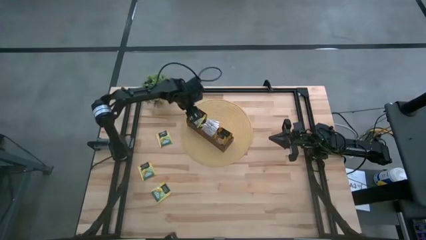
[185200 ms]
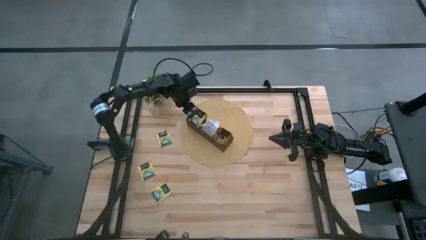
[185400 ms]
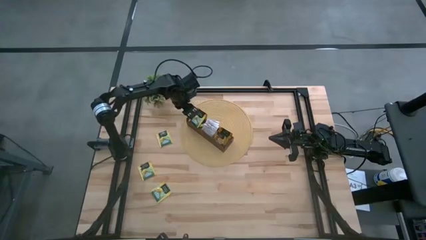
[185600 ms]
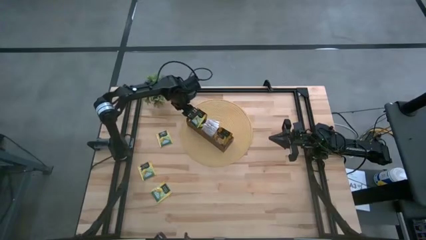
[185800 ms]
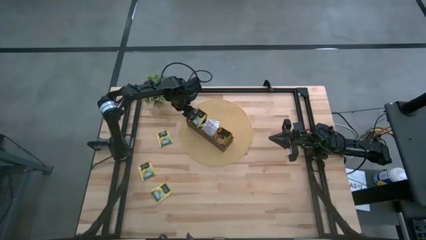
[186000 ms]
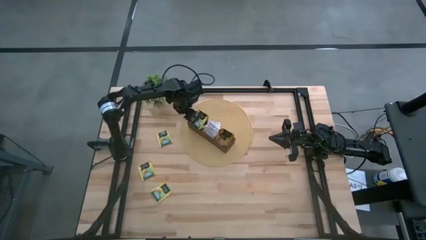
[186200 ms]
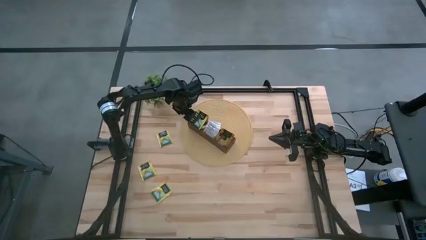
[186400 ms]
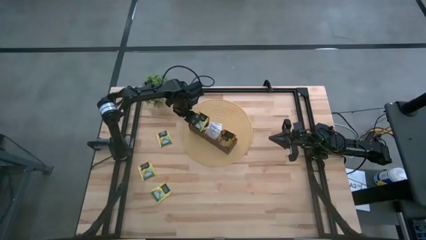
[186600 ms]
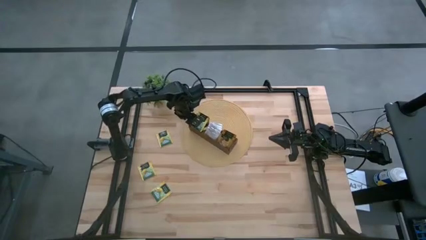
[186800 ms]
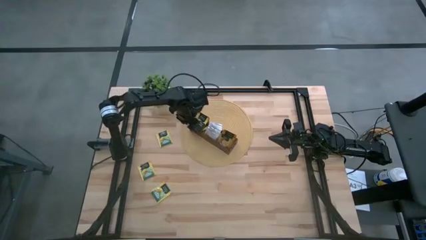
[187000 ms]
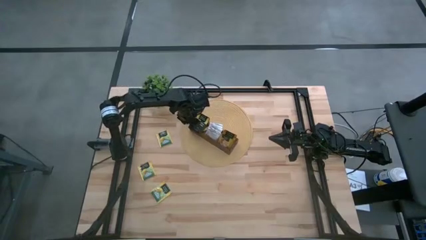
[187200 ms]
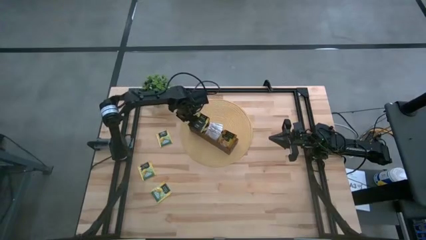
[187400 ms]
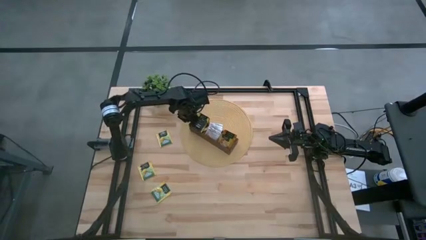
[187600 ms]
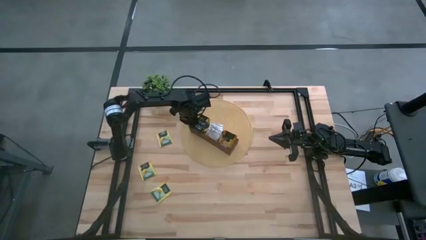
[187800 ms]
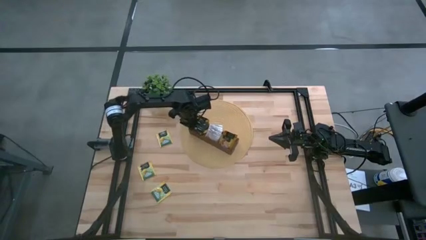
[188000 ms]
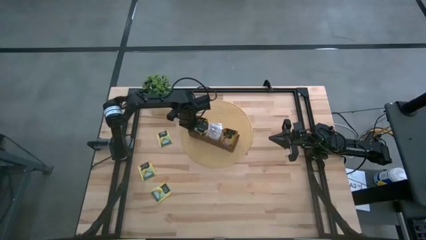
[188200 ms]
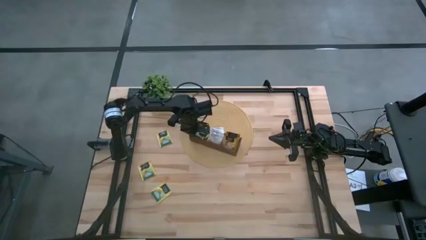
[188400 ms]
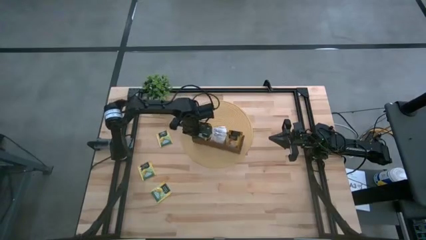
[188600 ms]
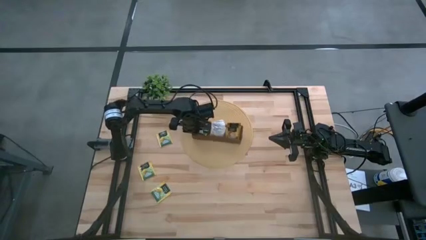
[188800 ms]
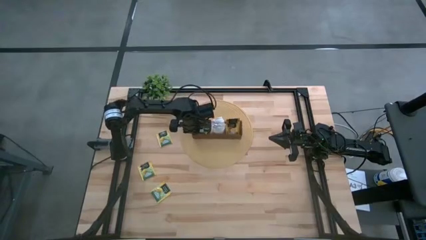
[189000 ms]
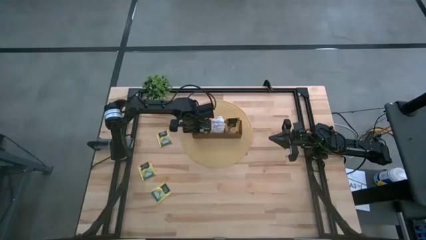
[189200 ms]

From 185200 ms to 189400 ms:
Task: Pick & Place Tea
Adjust the wooden organizer

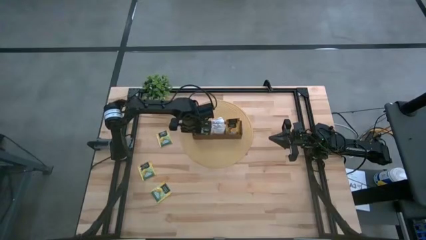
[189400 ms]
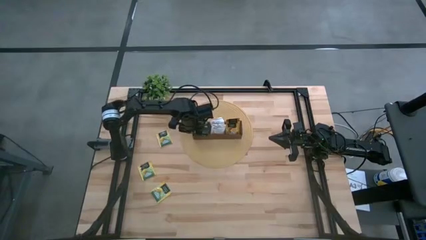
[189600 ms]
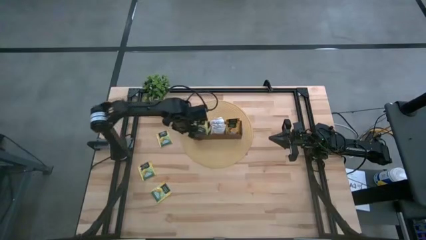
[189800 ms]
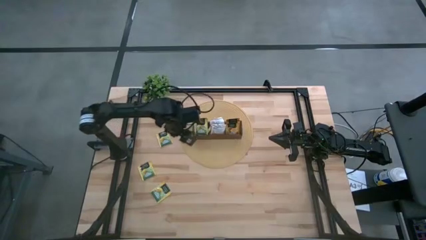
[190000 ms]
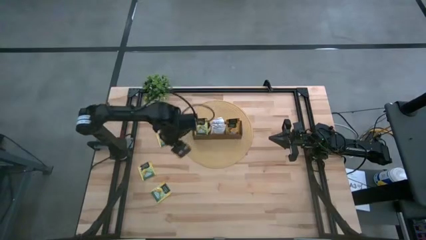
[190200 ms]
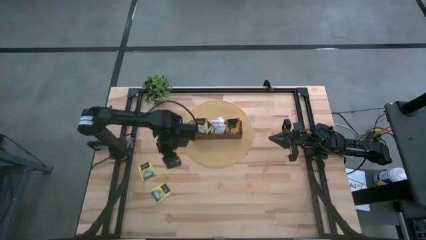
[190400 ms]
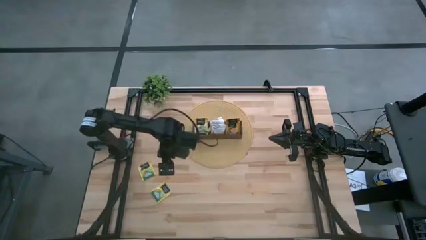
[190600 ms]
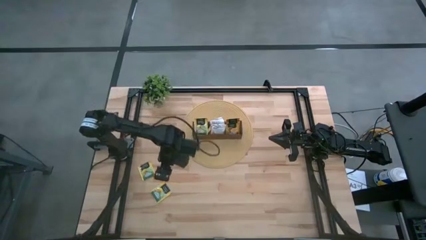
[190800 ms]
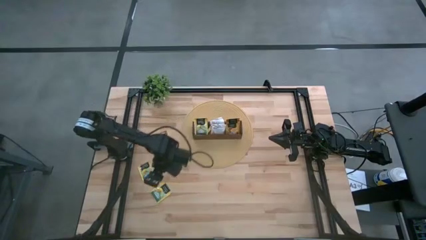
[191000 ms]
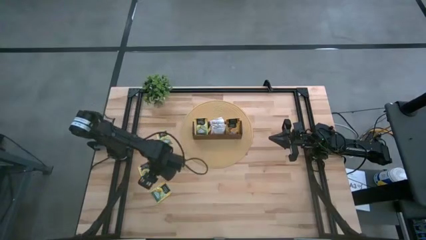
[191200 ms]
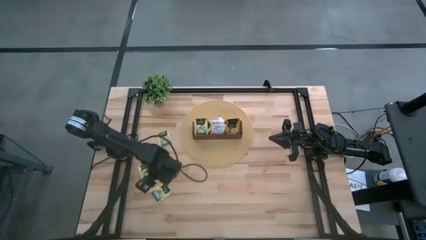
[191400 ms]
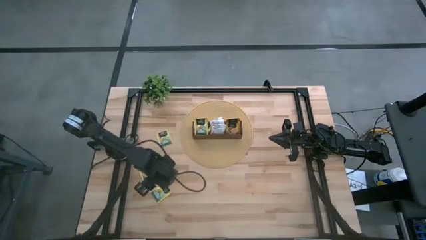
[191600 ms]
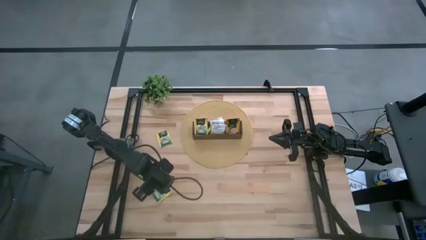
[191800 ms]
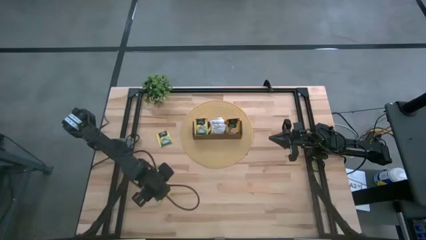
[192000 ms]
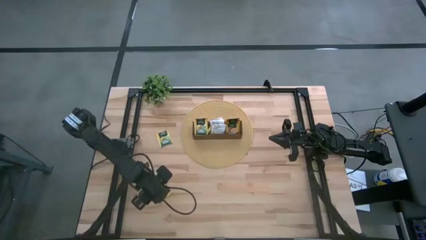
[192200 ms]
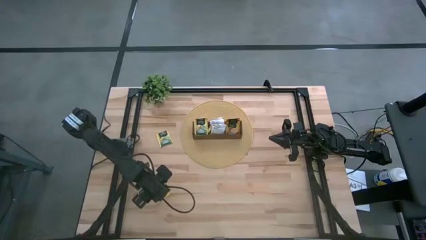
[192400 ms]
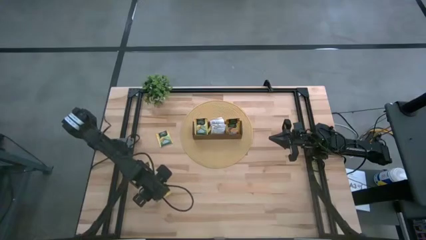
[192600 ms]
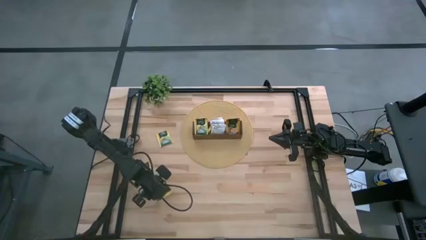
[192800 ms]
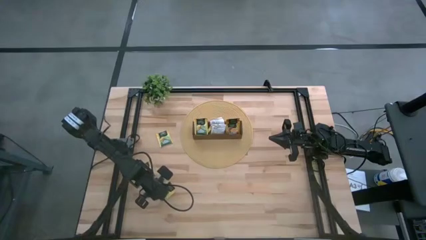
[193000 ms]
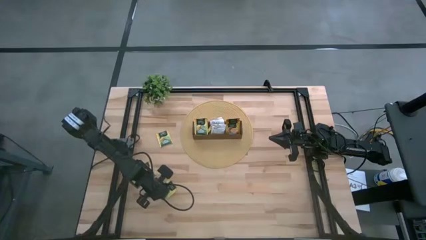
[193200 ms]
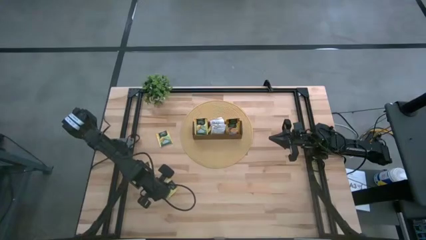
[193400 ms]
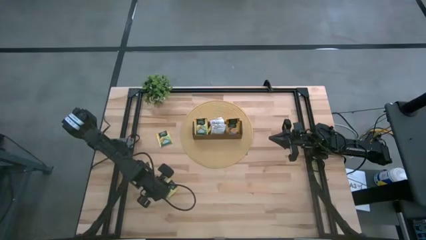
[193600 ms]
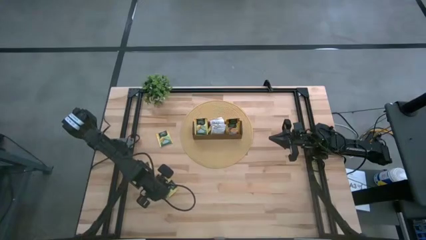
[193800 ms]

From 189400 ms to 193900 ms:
Put the yellow tea bag into the left section of the wooden organizer

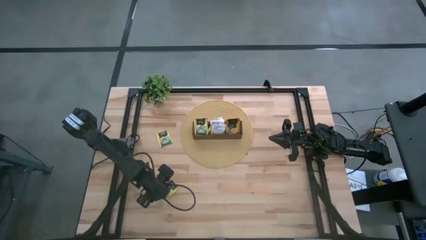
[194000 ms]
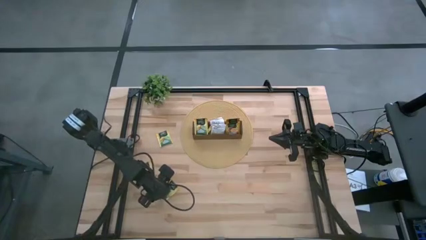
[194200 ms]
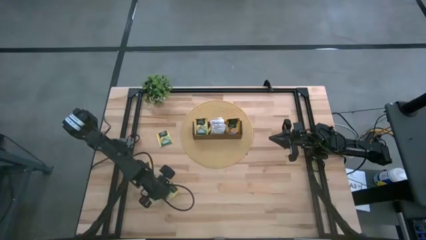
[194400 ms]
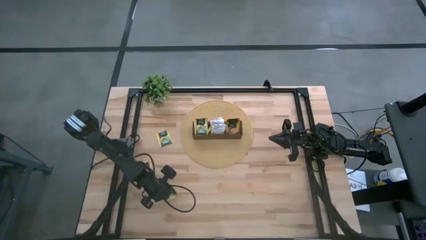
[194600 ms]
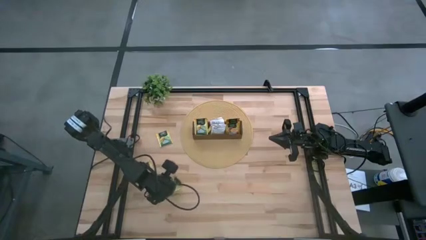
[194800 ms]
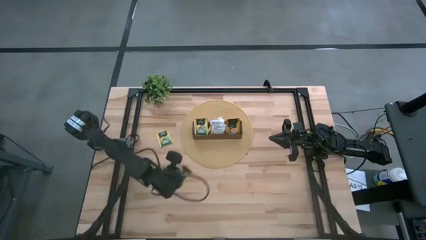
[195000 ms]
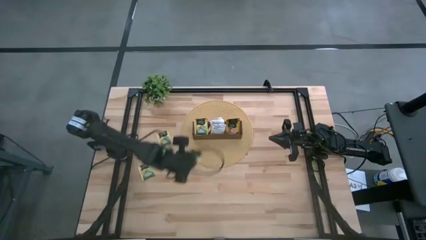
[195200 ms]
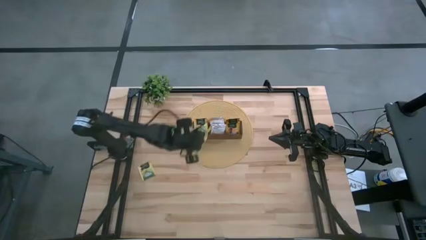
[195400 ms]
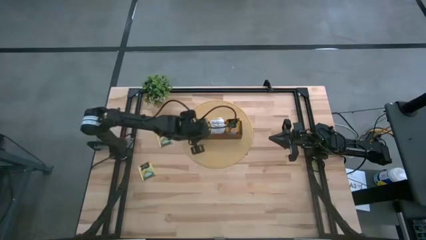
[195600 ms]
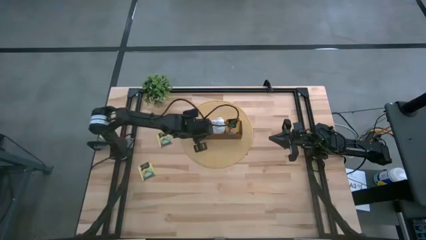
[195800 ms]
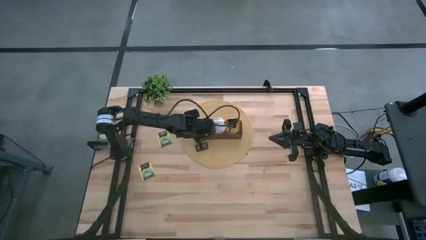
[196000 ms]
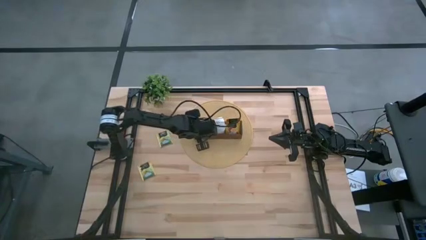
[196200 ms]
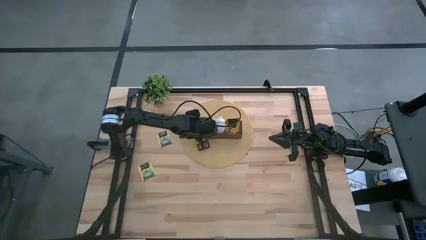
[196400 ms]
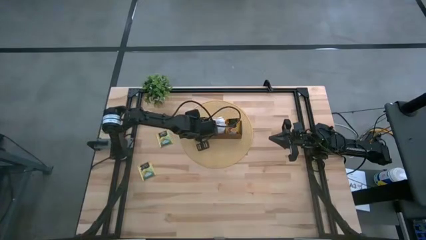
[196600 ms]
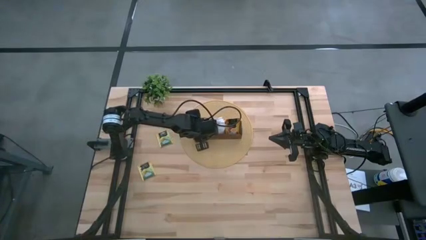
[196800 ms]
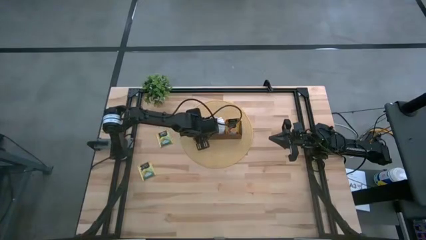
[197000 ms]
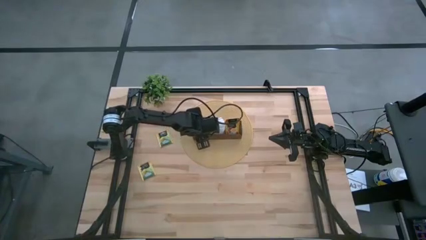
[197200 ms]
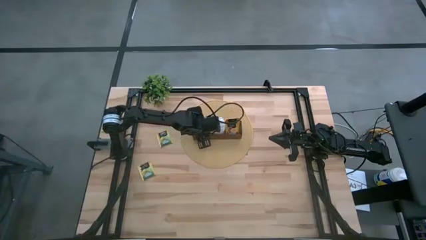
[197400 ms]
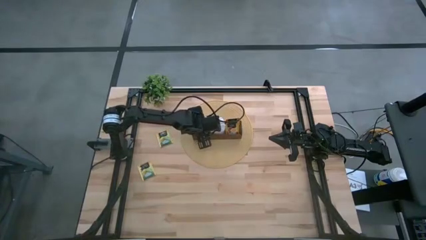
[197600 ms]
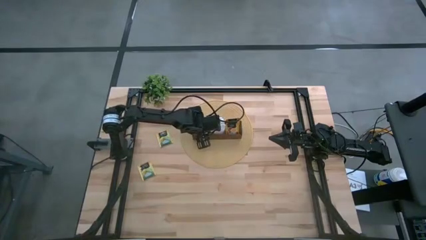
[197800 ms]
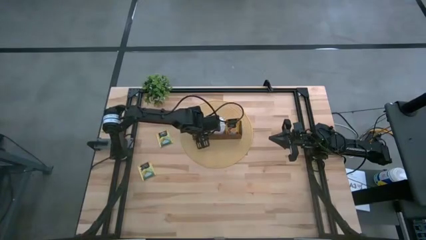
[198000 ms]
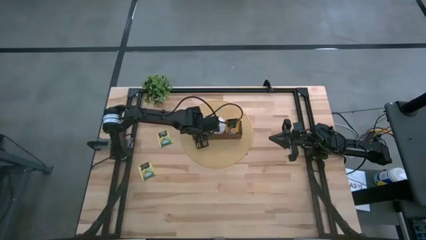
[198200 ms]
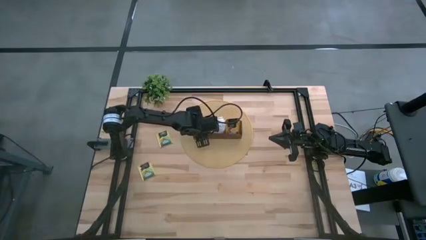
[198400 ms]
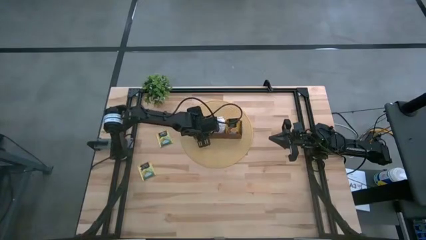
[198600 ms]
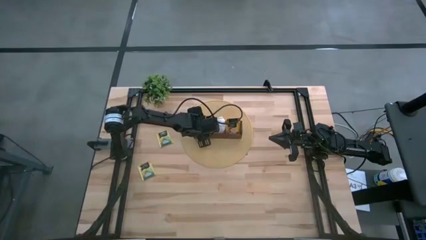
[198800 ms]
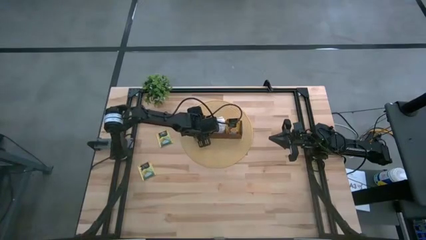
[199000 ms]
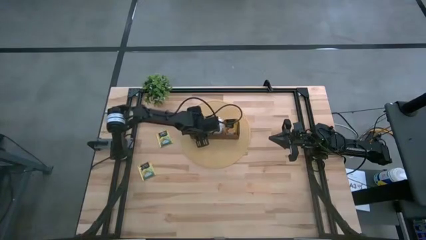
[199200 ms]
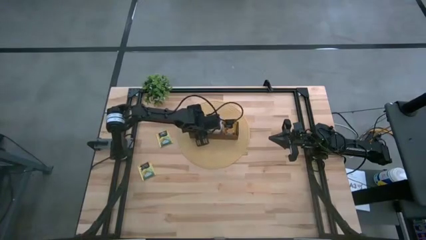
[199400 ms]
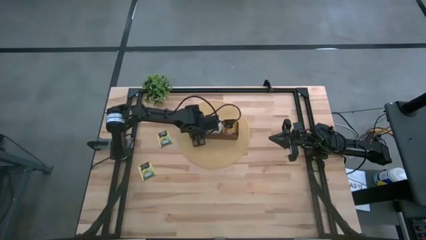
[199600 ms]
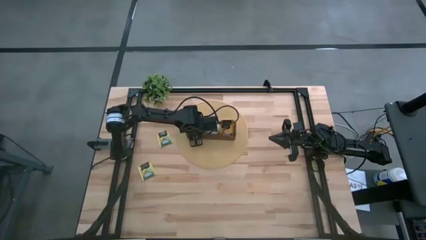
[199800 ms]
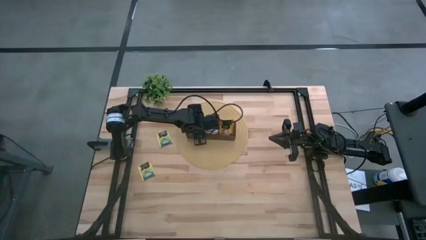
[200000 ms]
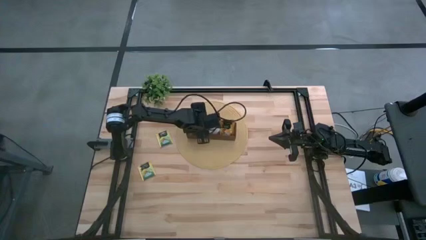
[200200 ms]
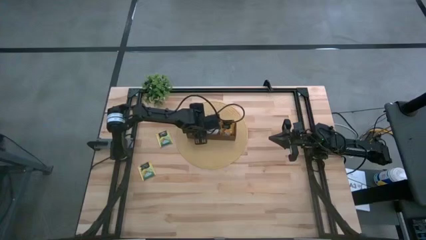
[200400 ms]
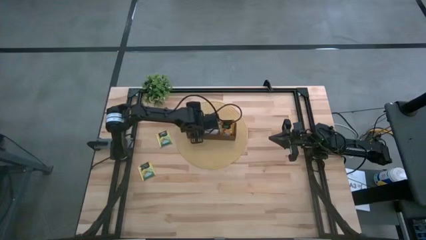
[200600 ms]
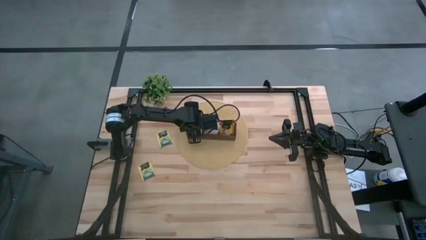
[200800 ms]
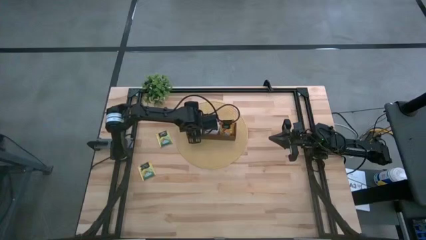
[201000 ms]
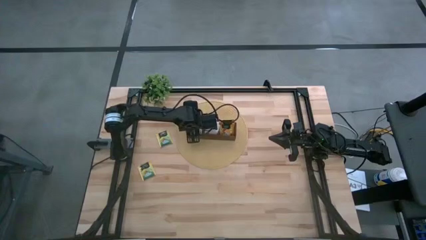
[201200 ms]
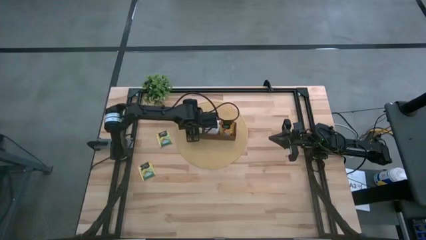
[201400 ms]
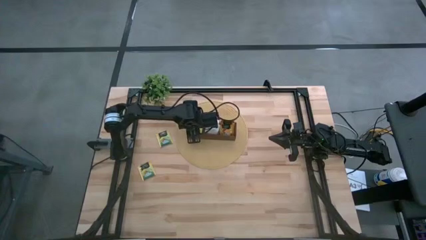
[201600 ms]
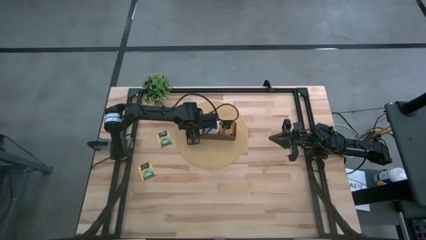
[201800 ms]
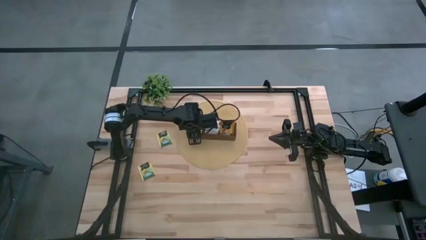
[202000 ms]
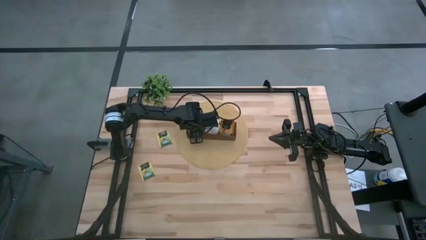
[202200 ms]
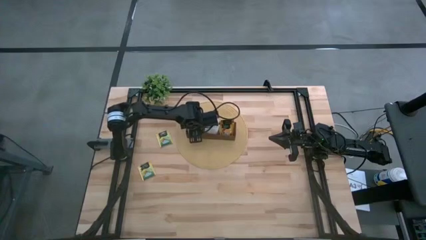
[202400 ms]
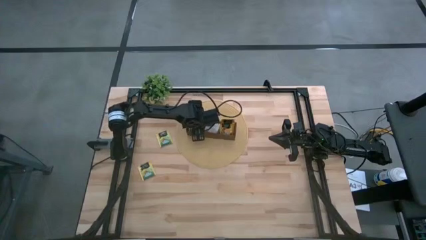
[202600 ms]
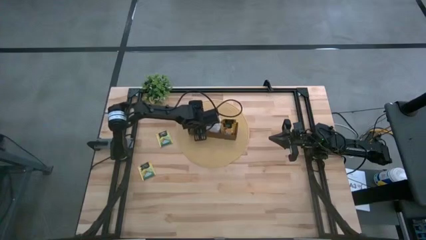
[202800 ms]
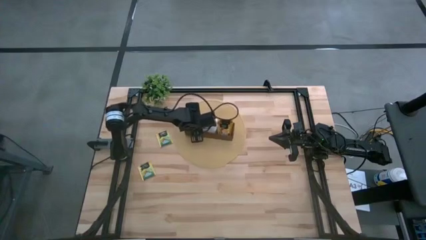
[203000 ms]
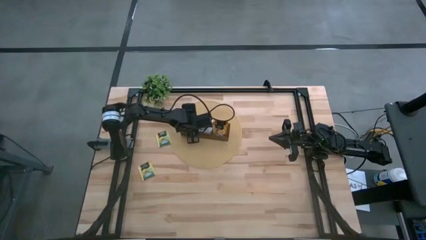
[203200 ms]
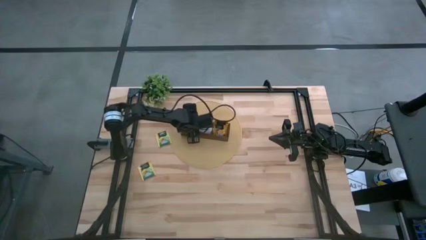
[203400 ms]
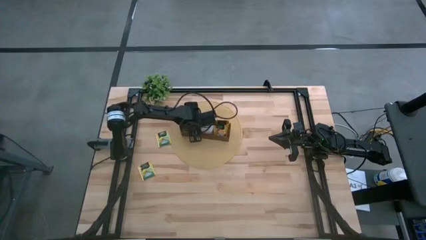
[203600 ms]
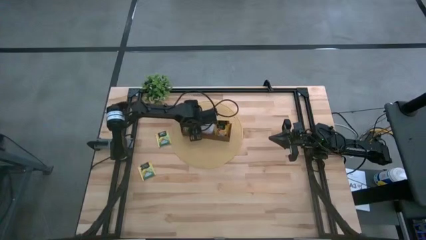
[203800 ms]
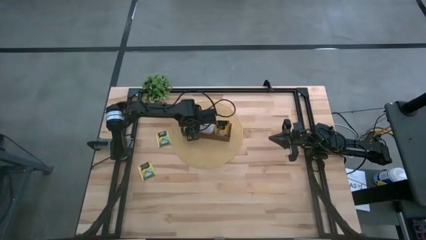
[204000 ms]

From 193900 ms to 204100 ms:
Put the yellow tea bag into the left section of the wooden organizer
